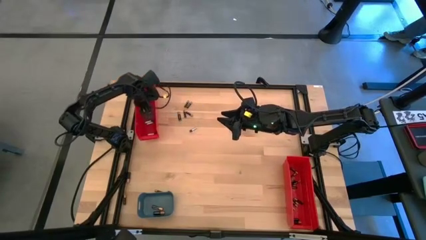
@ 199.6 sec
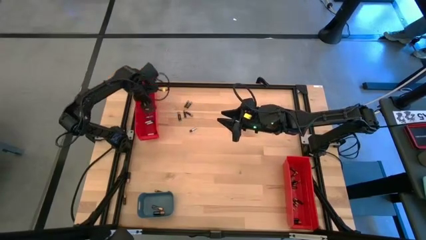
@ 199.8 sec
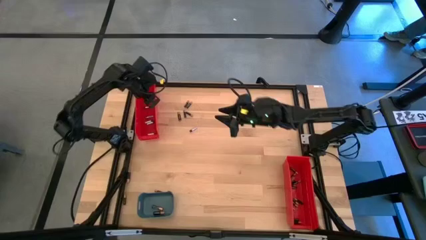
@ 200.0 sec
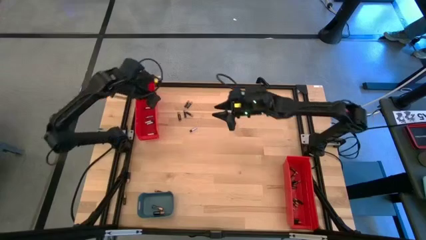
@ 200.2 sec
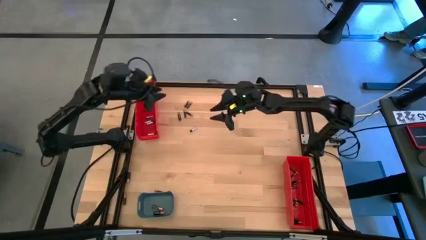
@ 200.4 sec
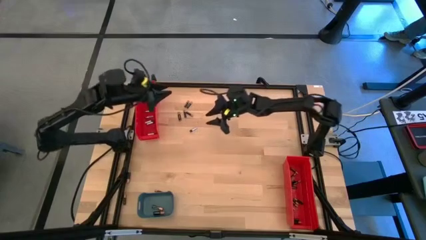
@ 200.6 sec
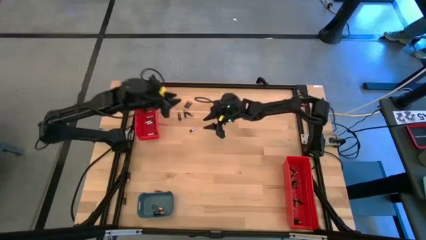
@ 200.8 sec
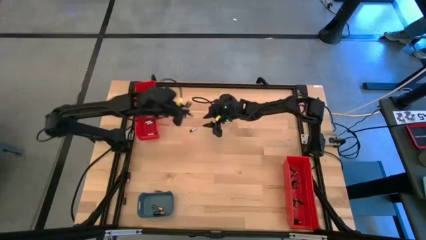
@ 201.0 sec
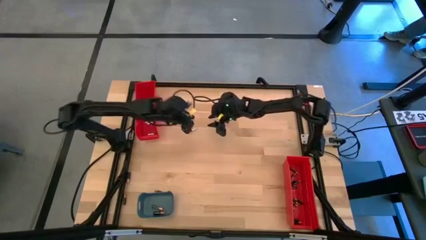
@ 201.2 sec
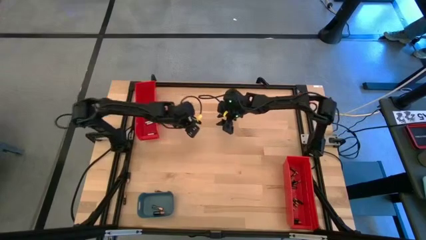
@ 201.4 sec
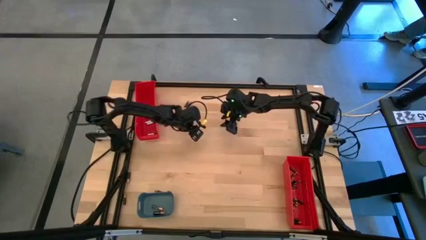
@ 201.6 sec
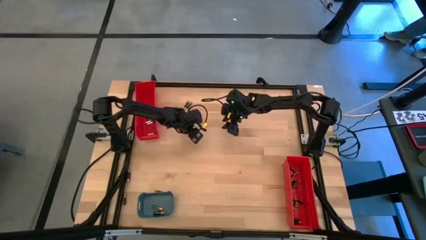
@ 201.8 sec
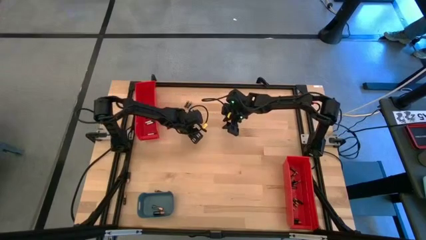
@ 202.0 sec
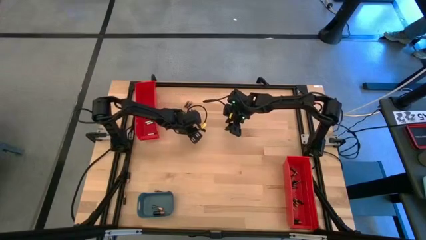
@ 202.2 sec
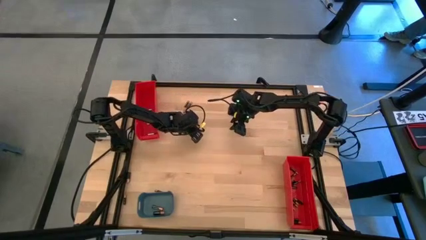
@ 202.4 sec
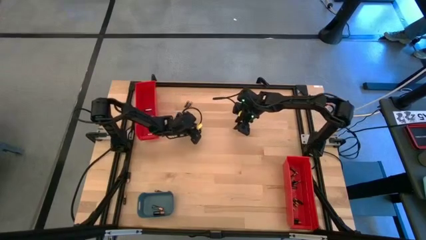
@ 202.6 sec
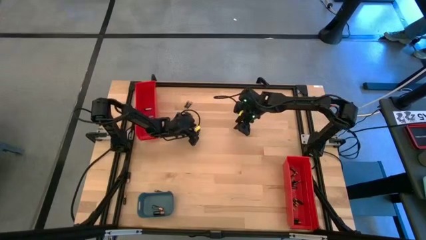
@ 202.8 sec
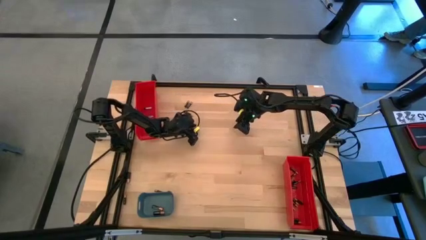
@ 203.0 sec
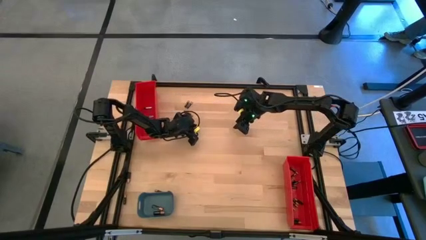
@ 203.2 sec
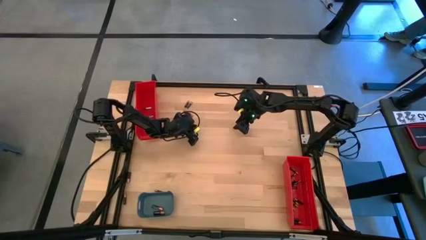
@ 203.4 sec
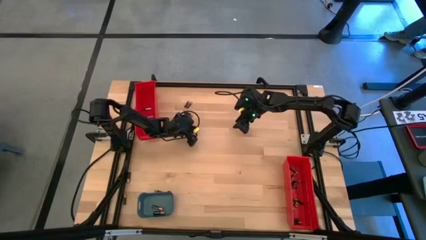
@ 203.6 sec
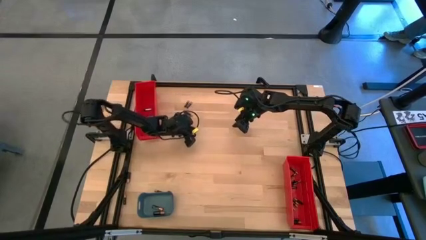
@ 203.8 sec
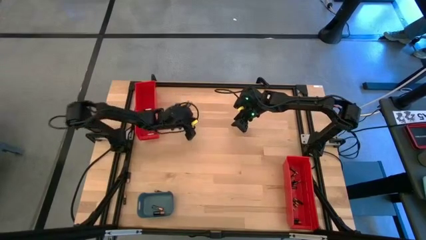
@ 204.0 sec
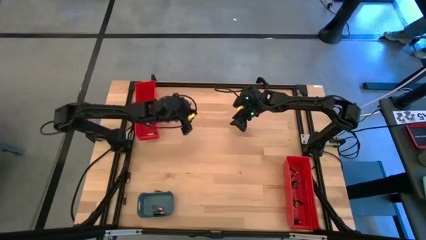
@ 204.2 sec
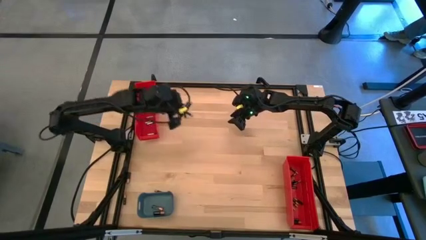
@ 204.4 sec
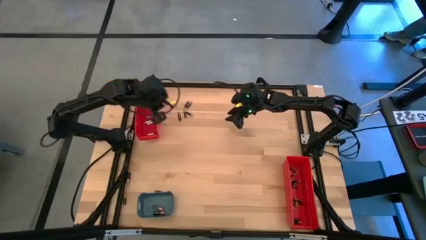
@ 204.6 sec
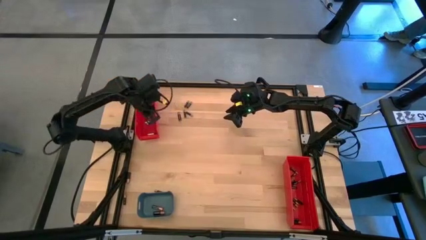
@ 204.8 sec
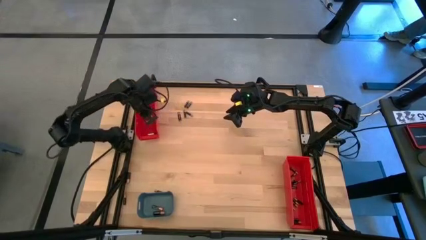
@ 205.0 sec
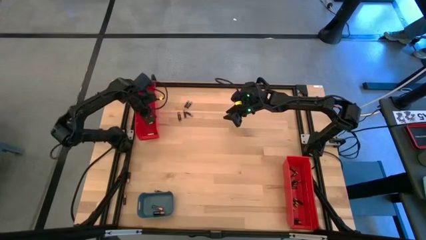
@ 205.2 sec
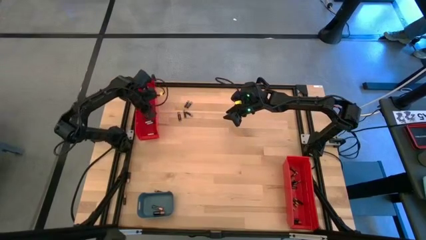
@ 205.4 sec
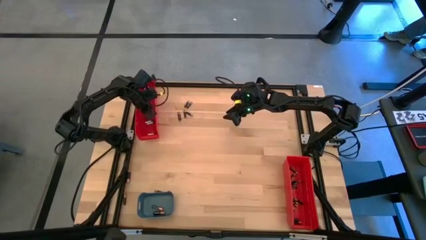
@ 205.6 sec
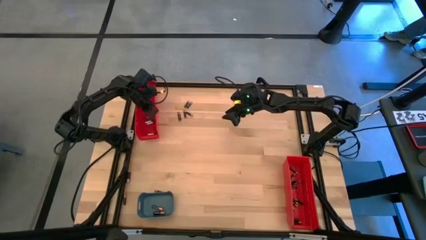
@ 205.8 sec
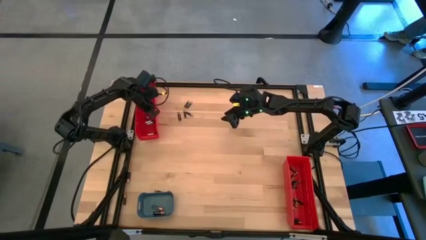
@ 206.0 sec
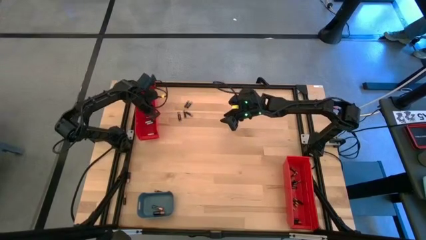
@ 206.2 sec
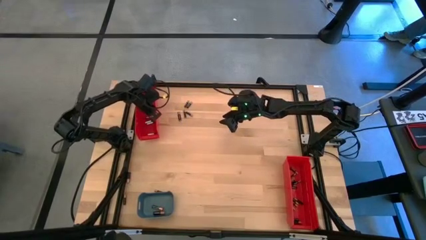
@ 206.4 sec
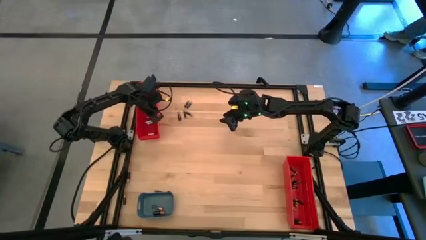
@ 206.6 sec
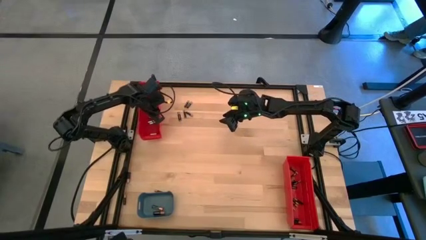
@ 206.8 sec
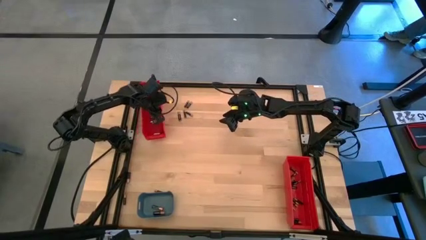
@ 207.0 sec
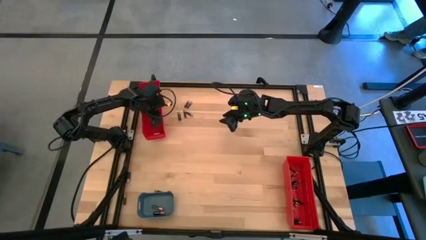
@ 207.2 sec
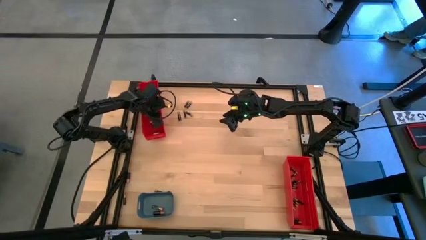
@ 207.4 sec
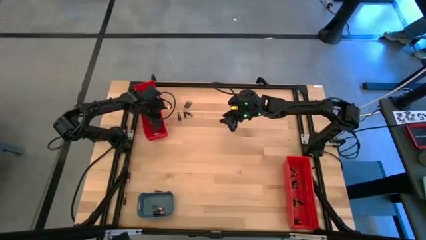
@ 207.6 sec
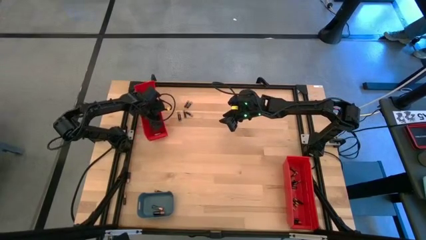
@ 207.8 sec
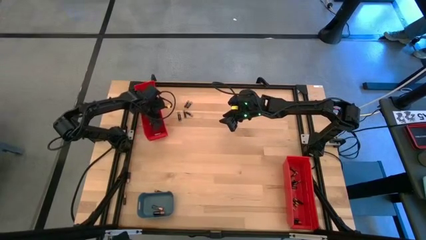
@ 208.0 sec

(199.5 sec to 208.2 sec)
Task: Sort batteries
Put the silver battery into the top red bin

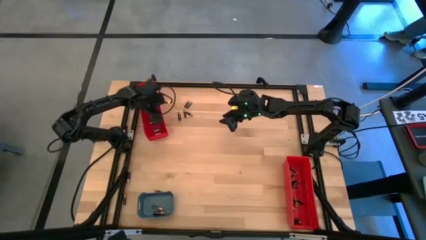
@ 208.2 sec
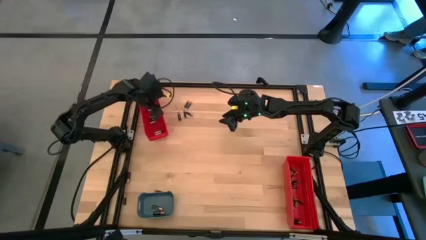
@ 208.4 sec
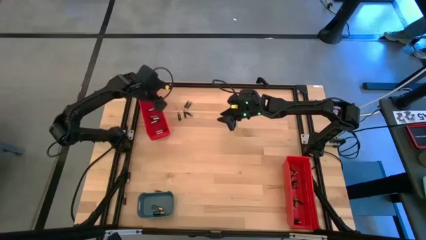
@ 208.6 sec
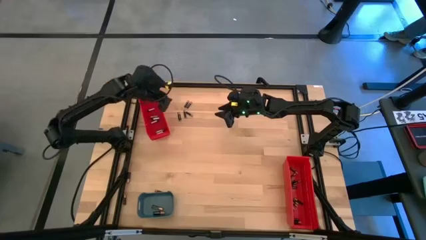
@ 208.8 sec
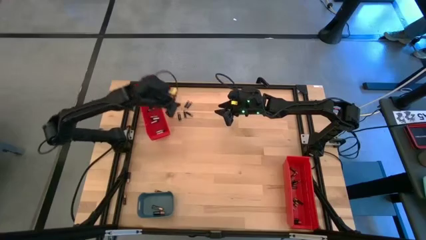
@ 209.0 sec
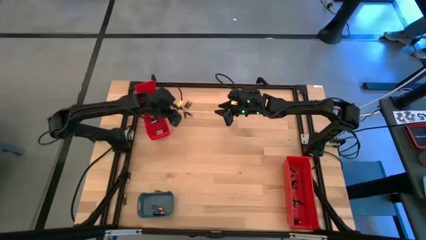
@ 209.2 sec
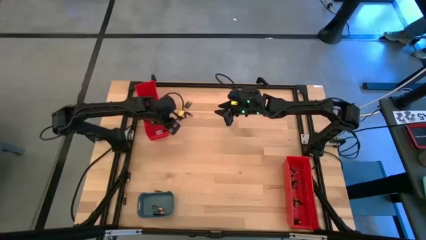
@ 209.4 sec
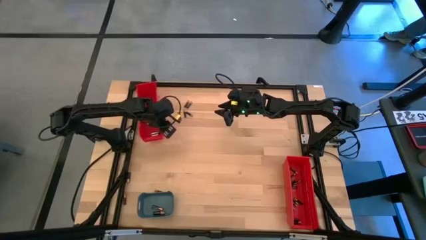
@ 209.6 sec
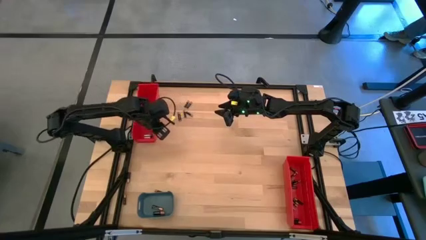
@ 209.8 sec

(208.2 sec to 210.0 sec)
Adjust the top red bin

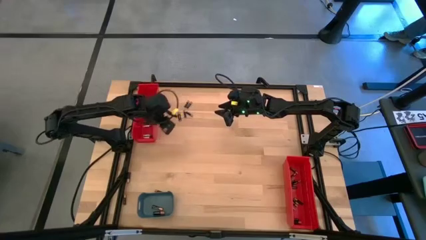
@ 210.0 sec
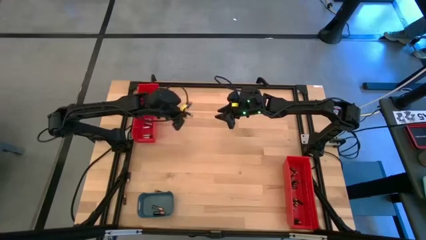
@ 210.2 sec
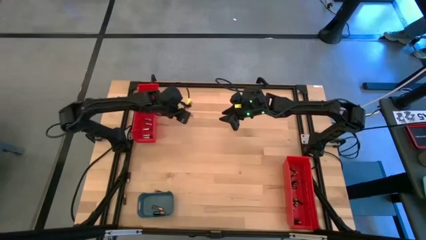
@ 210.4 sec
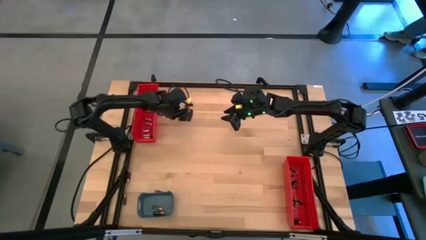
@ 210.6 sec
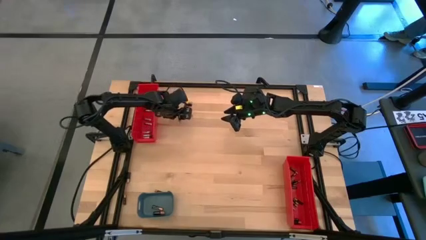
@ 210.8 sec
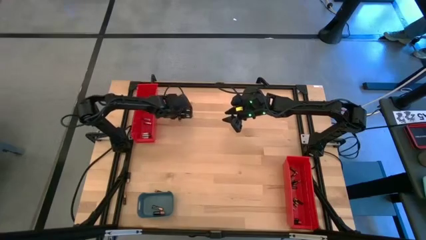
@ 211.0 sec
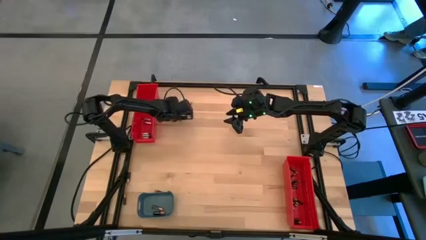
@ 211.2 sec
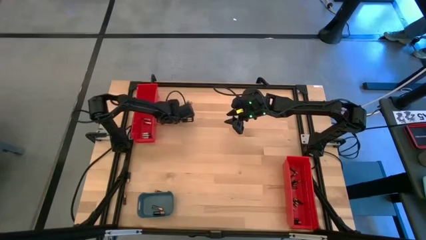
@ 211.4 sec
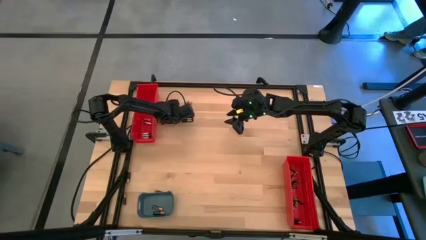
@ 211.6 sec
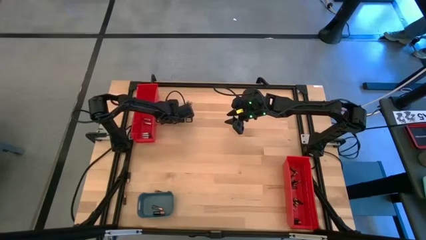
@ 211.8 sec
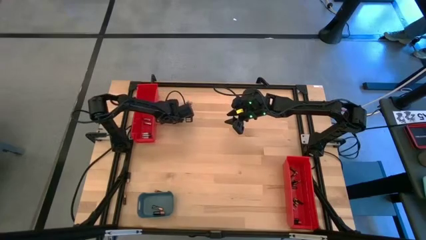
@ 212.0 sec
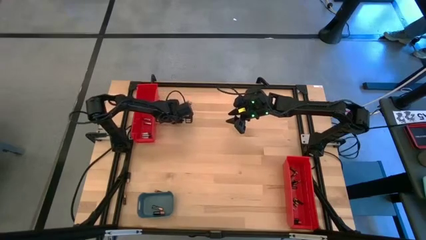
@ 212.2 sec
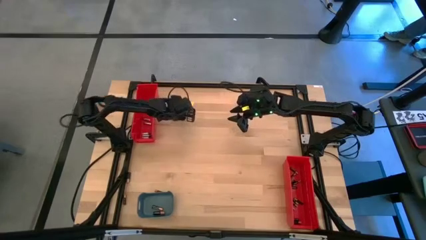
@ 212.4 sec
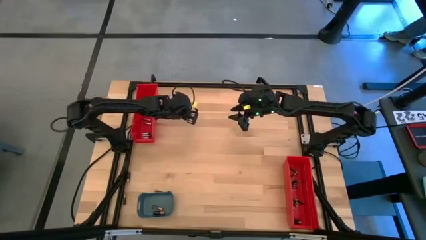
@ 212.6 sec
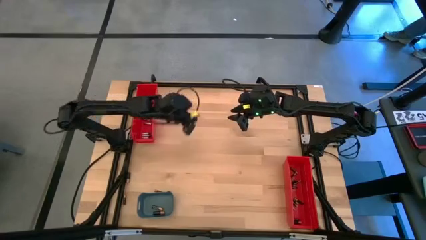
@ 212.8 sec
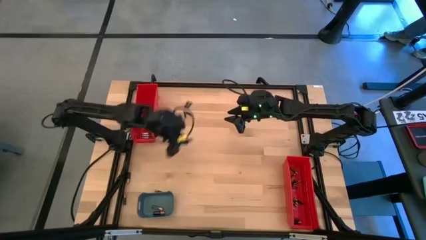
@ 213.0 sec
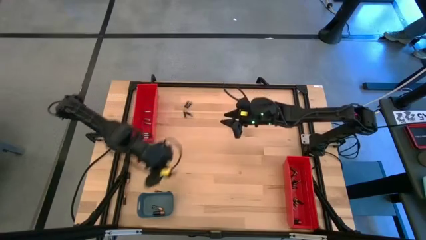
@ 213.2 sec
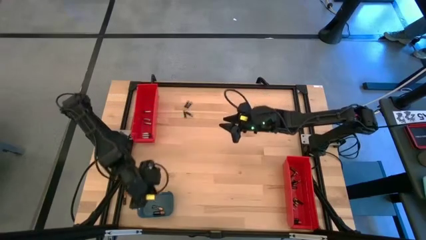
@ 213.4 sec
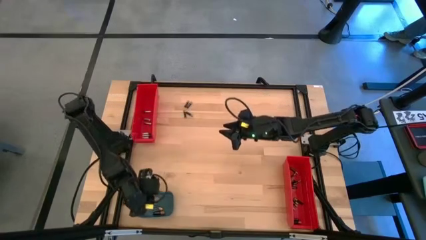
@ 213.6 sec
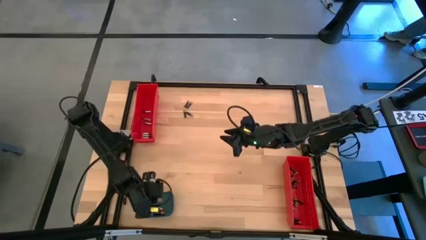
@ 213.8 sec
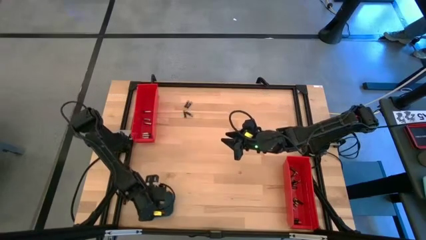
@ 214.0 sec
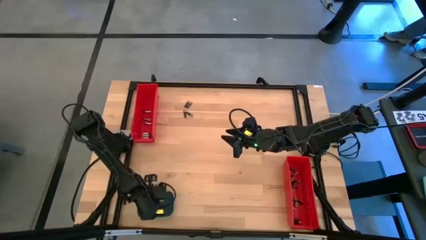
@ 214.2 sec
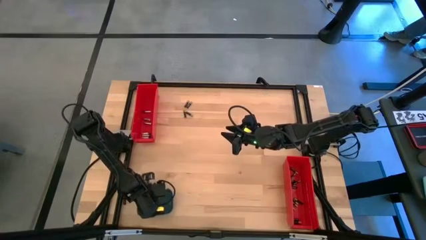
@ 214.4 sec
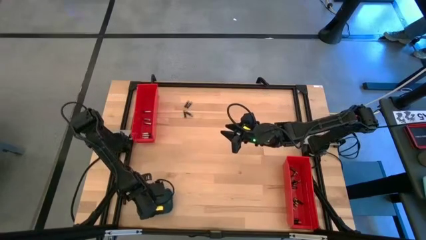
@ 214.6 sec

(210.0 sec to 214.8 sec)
Put the large black battery into the blue bin

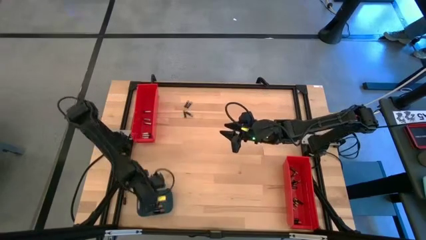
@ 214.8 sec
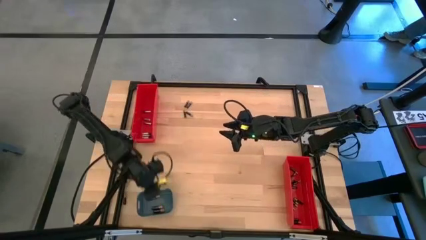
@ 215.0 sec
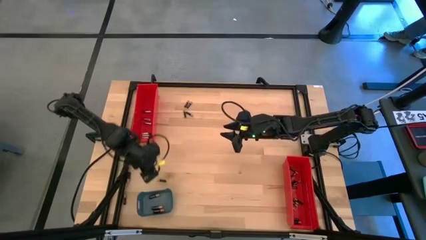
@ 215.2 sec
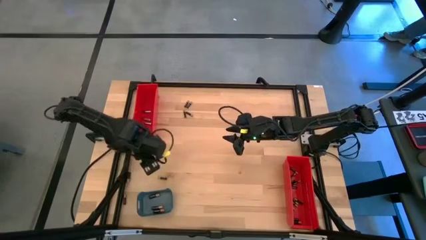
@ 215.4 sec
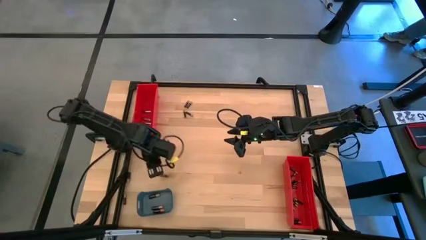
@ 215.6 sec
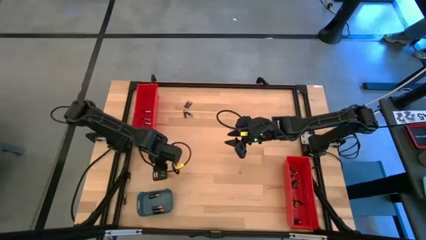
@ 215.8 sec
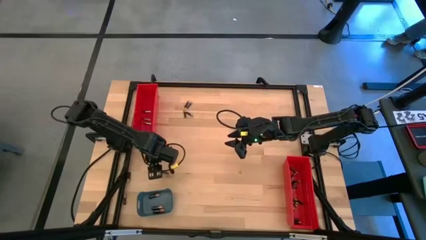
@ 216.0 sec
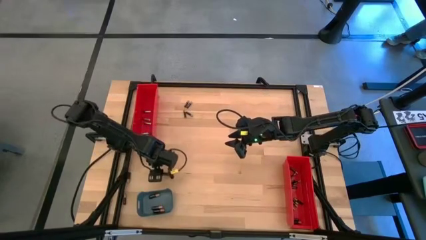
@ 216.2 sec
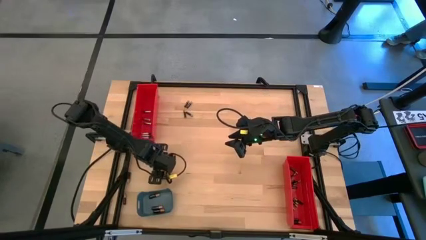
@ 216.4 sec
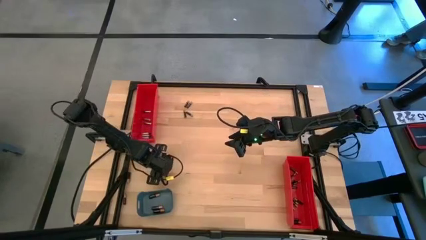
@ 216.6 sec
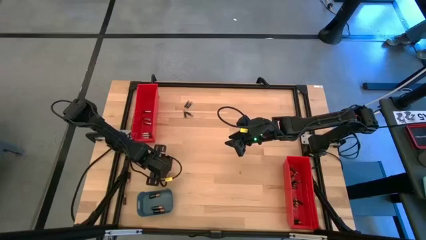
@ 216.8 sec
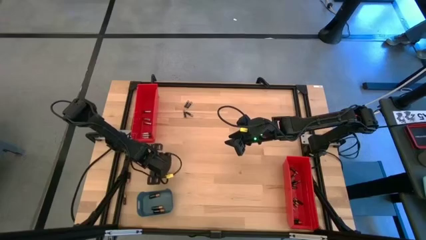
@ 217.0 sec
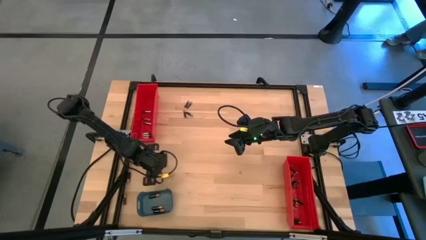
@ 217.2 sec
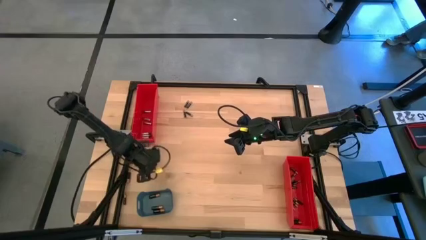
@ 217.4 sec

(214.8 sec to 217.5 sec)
Put the golden battery into the black container bin
